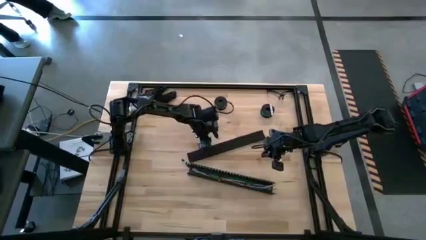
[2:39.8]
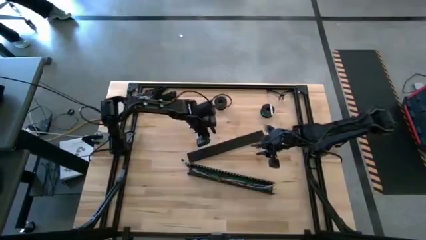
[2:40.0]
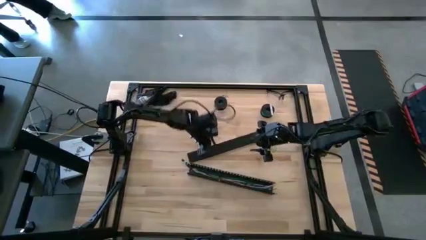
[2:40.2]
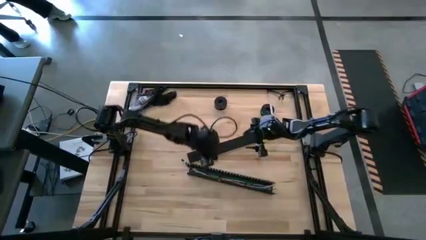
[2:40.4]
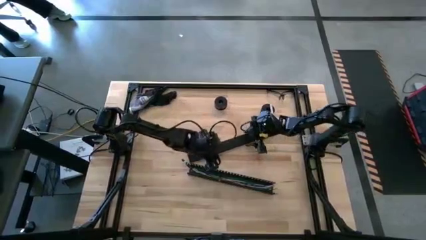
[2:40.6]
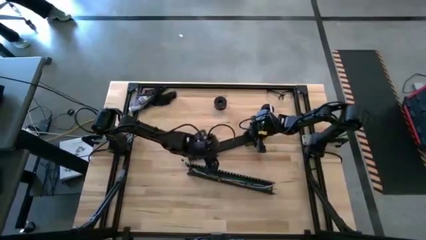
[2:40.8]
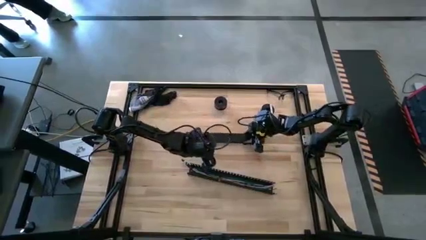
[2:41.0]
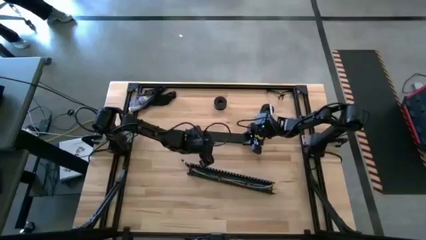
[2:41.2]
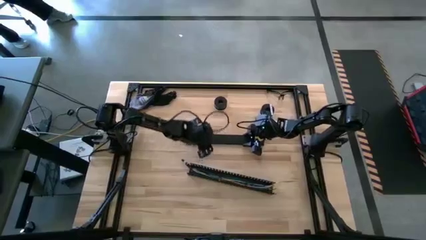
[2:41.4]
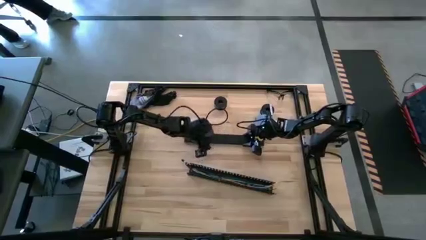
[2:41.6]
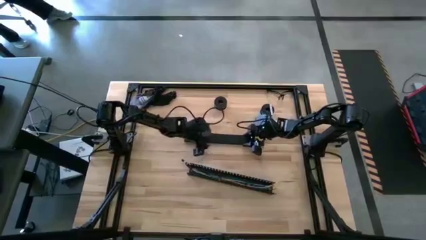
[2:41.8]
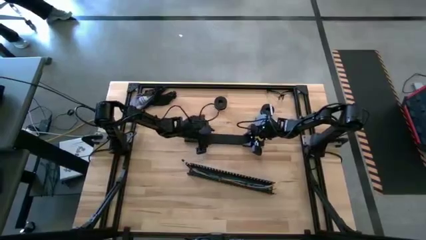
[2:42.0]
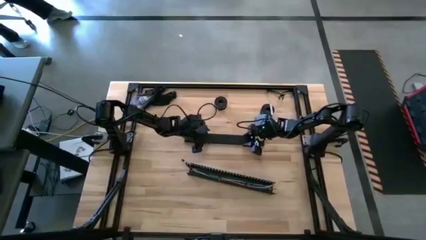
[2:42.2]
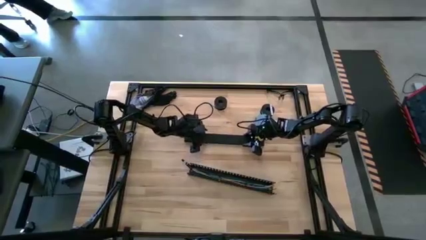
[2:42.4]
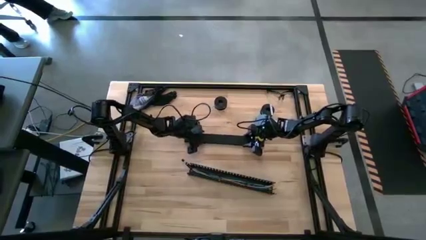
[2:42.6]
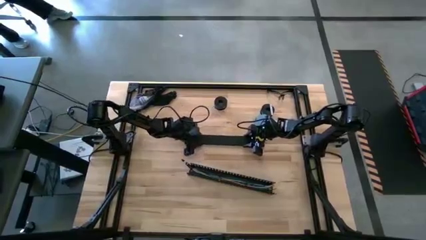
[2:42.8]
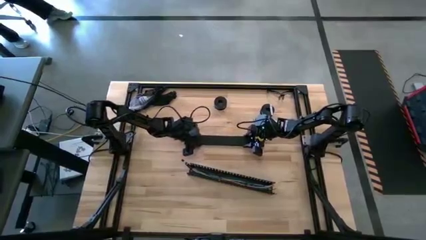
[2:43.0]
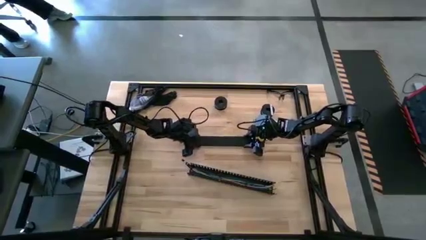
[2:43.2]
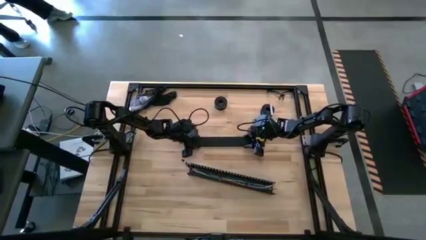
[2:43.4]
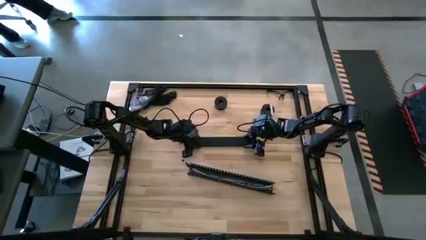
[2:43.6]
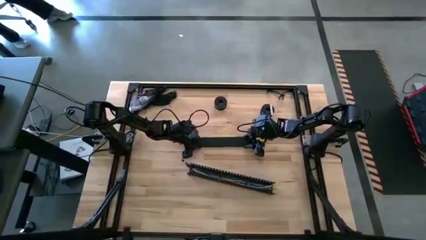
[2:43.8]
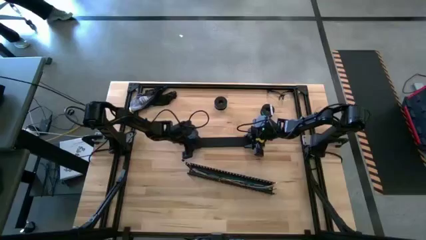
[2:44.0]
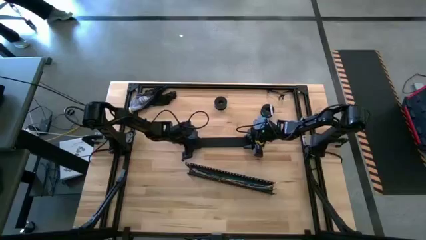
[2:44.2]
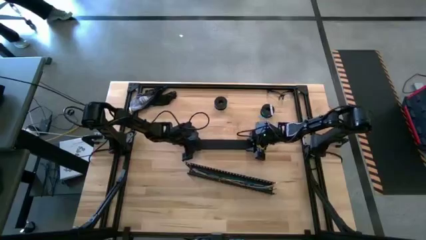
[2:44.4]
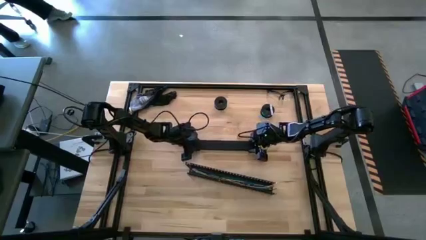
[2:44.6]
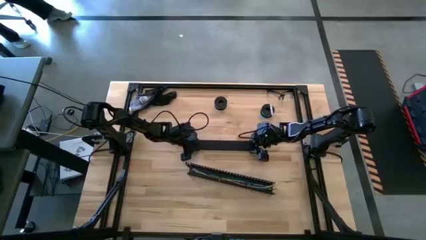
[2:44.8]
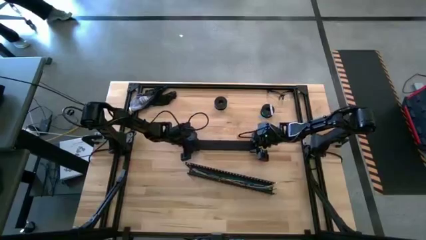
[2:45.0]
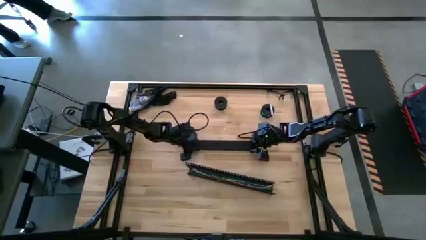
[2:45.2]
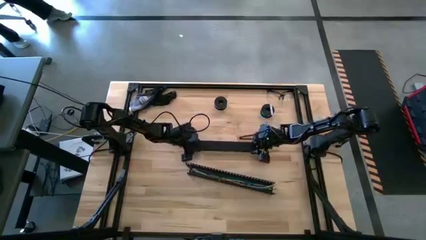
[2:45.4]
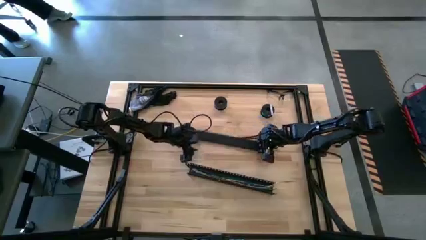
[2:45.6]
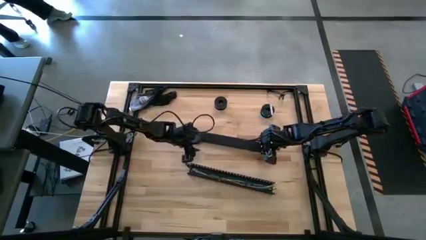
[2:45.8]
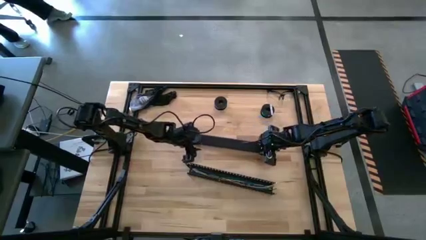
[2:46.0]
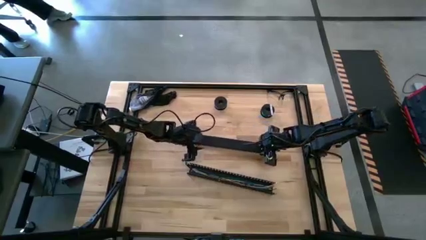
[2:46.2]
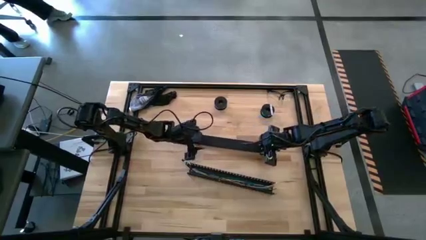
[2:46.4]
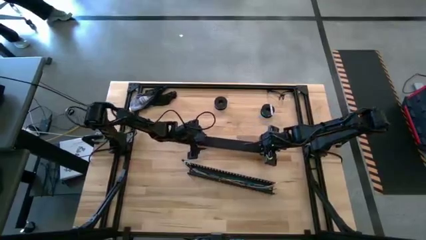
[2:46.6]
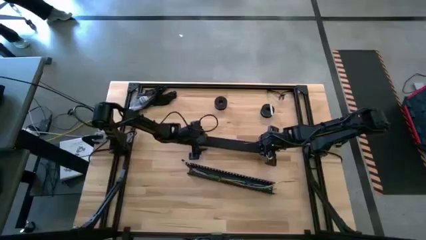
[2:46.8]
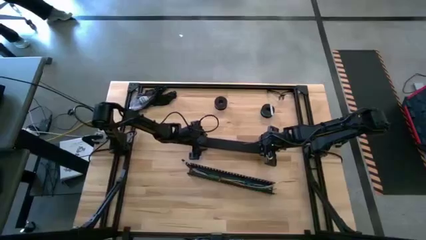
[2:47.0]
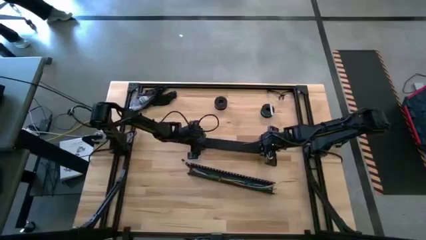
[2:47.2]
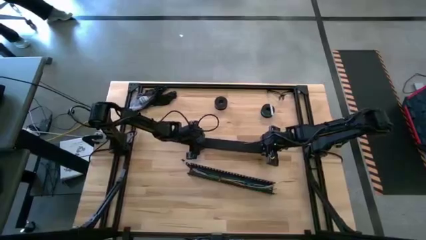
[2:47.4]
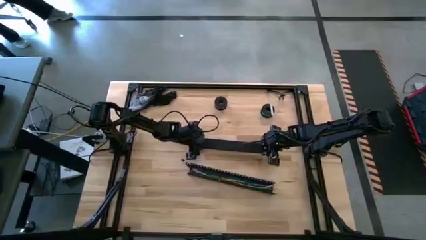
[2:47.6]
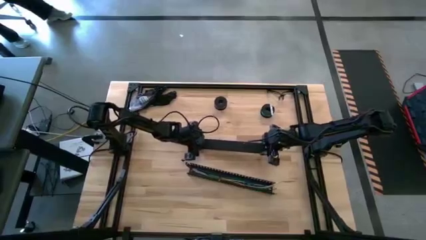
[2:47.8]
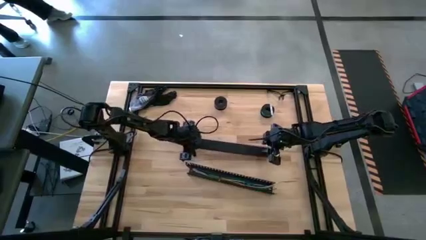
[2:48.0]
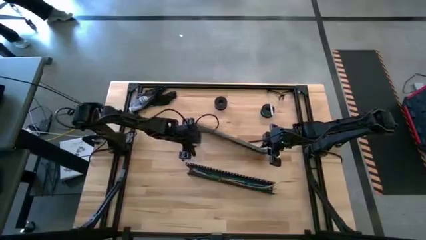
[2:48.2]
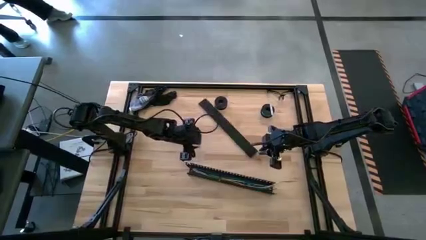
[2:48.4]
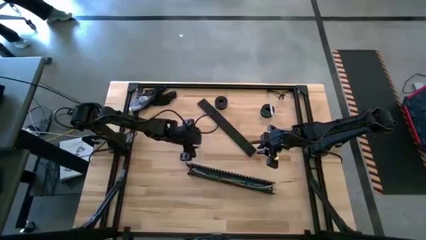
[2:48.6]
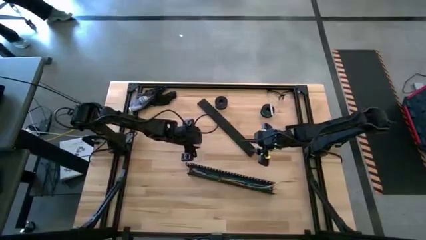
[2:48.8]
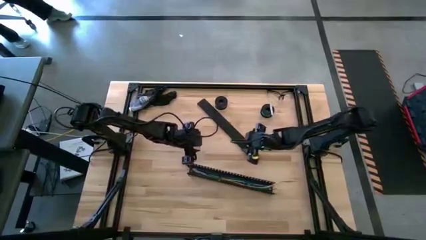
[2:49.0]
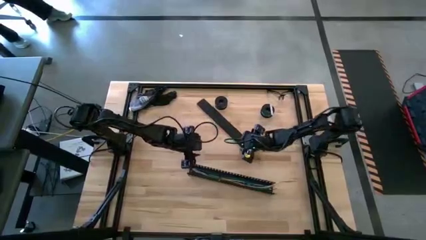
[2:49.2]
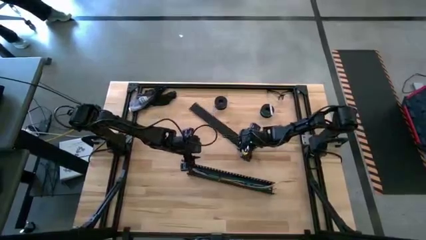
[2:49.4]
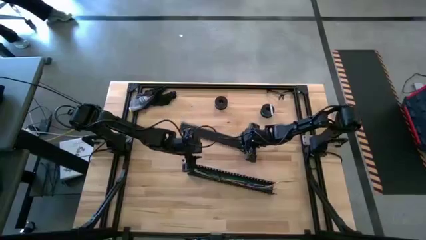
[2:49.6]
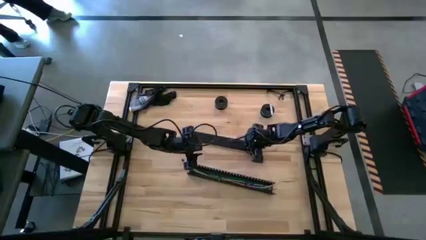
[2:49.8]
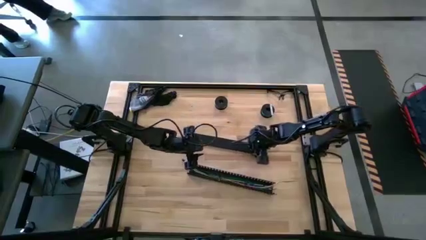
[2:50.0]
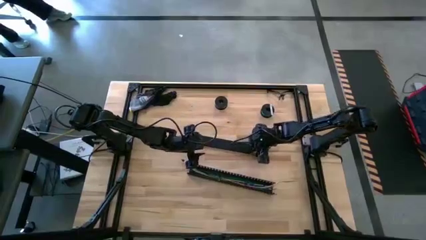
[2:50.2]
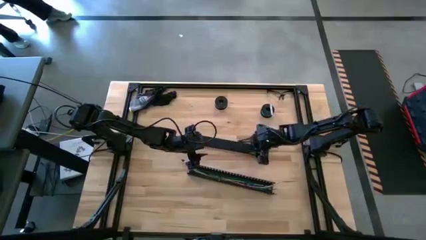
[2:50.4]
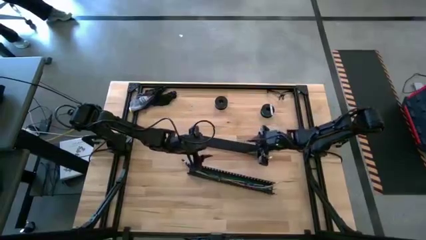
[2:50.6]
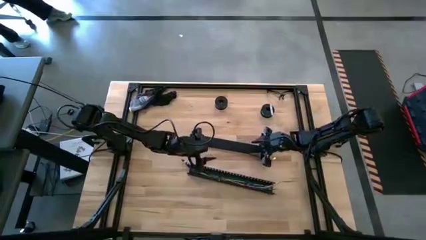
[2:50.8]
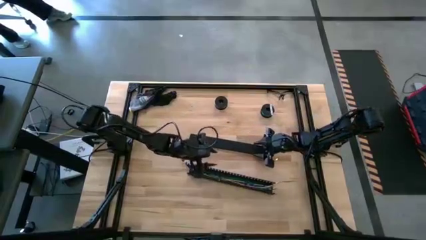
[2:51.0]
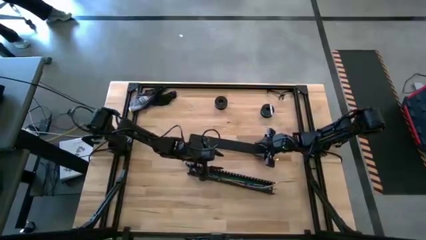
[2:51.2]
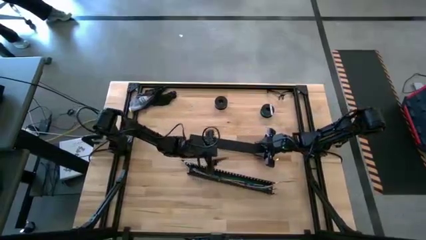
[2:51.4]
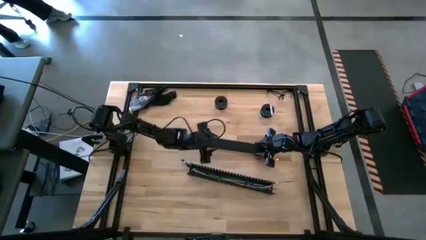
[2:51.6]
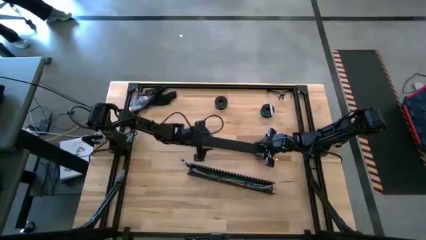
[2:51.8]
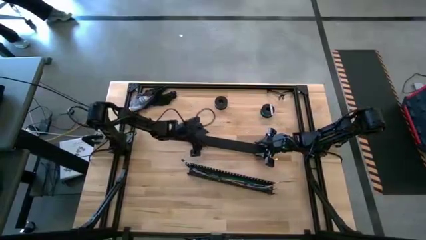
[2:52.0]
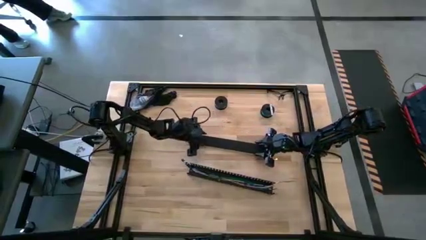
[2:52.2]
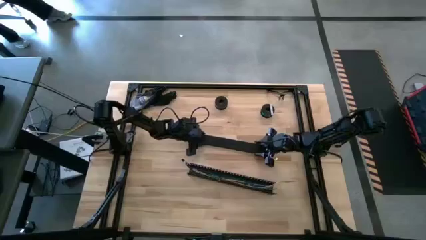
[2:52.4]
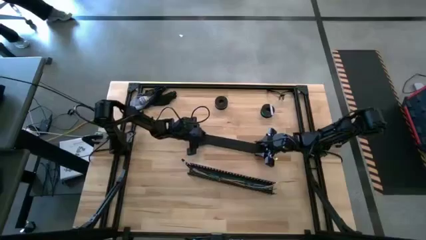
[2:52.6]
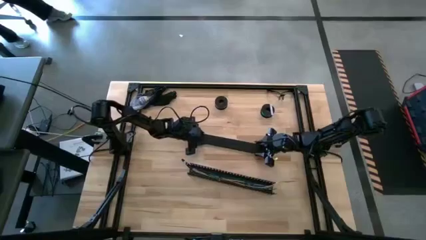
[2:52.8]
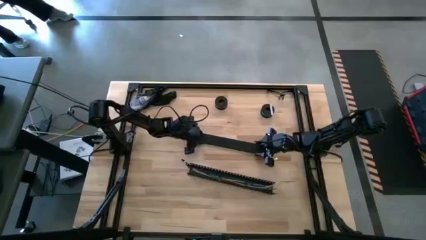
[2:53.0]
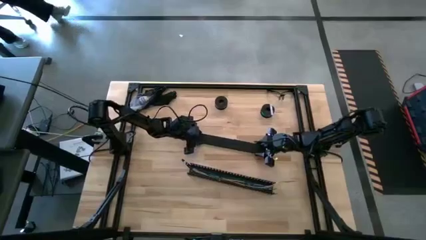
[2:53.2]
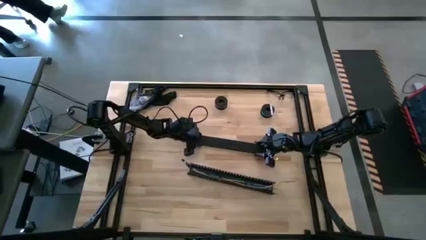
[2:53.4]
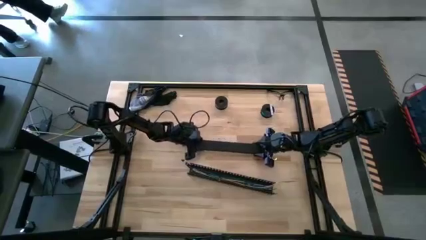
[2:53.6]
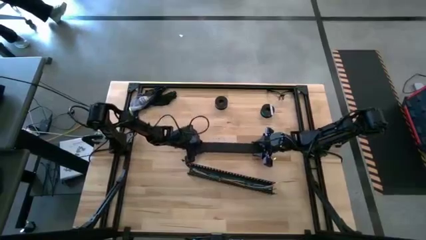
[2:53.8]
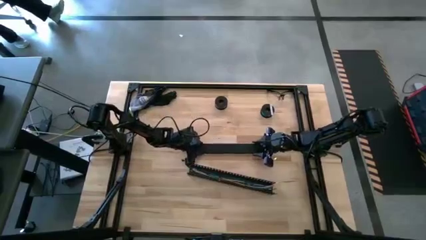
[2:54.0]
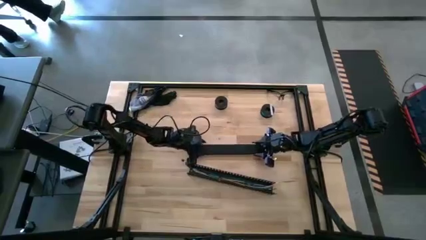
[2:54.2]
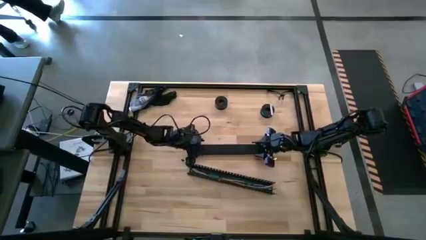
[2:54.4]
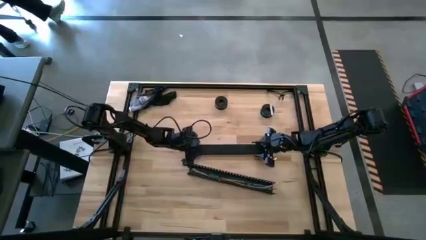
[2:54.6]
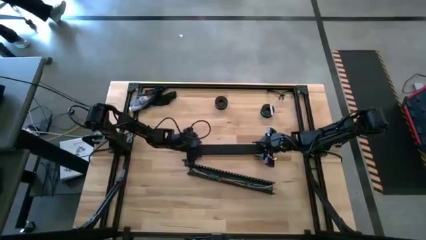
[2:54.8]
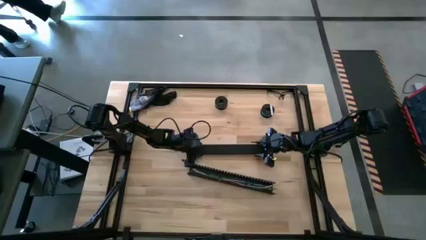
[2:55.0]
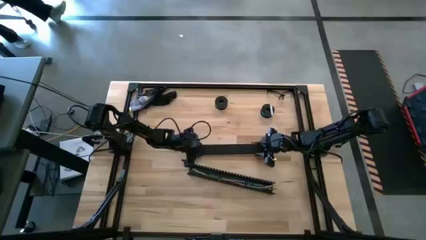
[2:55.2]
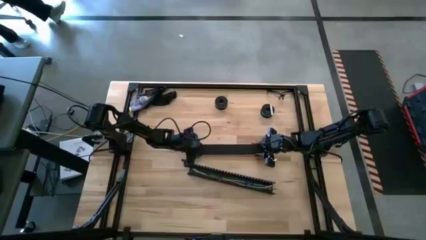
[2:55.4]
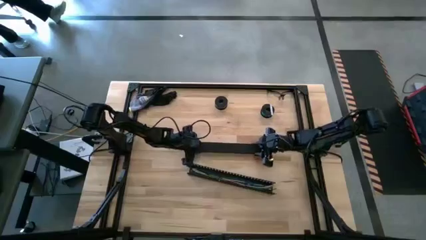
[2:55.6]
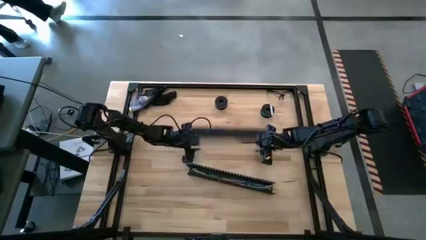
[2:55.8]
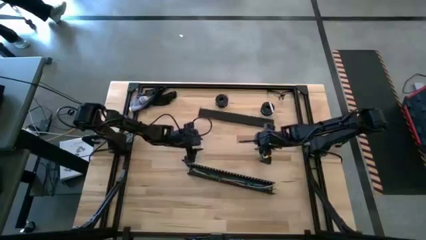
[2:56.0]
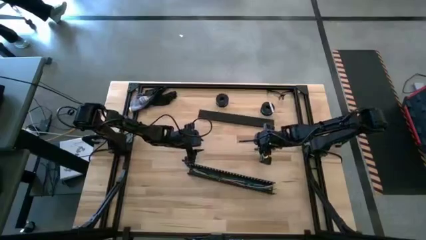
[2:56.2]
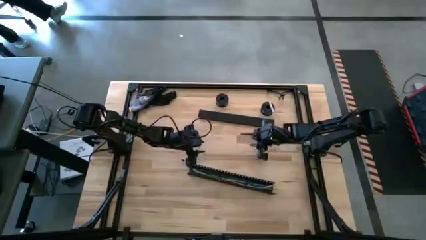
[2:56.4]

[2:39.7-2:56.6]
Task: Ziptie cables
Close the black cable duct
